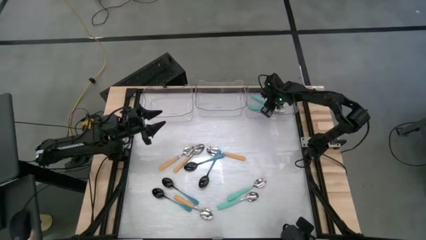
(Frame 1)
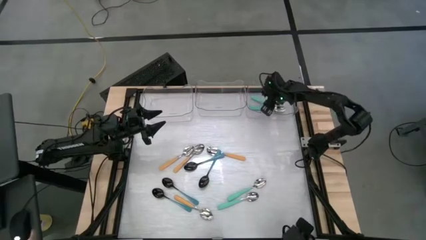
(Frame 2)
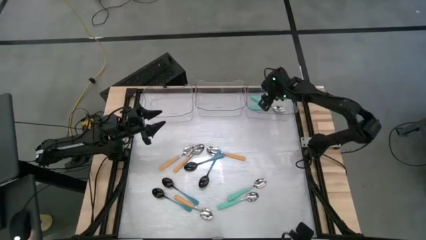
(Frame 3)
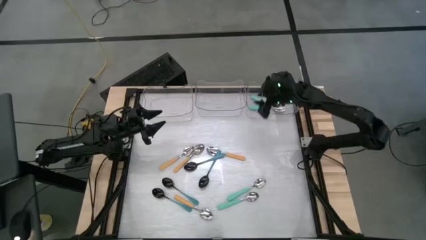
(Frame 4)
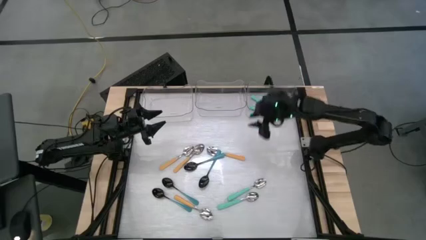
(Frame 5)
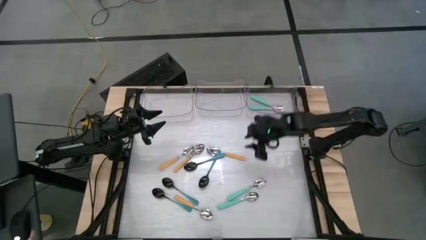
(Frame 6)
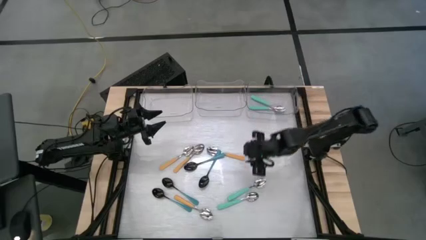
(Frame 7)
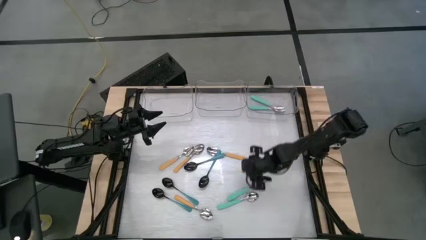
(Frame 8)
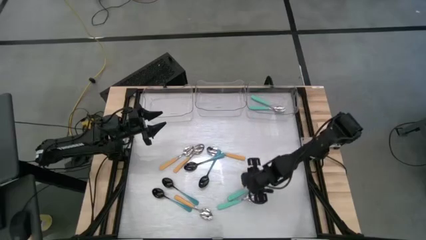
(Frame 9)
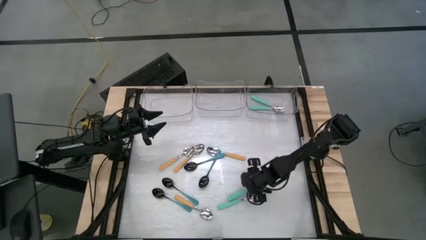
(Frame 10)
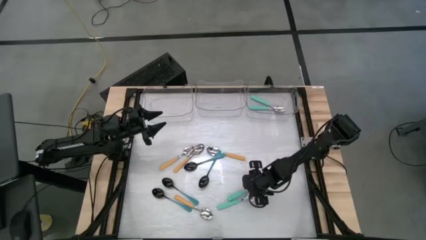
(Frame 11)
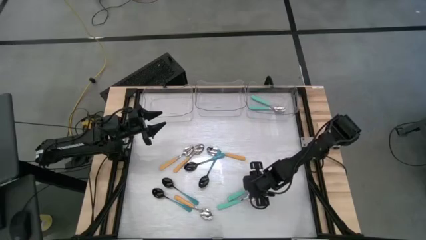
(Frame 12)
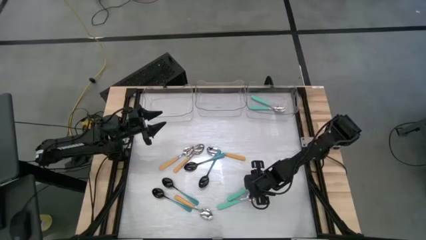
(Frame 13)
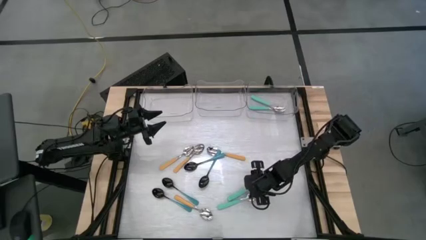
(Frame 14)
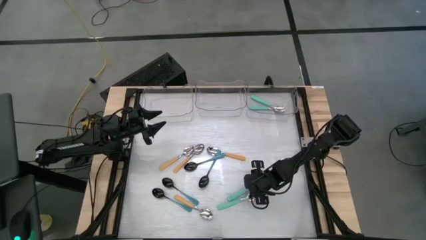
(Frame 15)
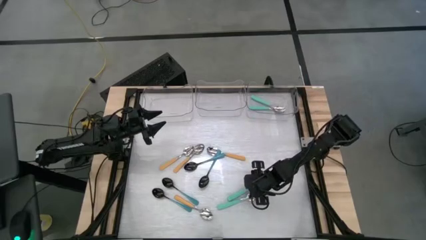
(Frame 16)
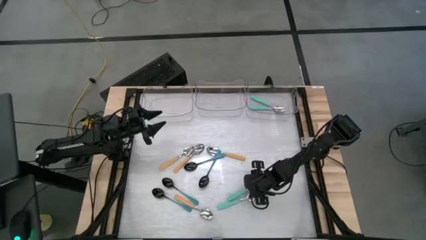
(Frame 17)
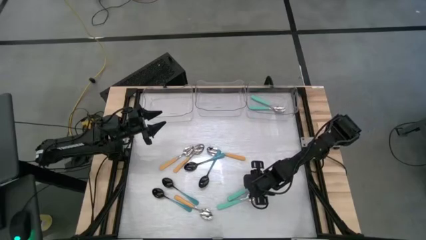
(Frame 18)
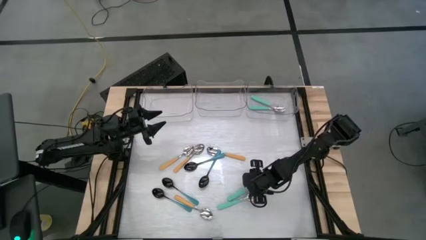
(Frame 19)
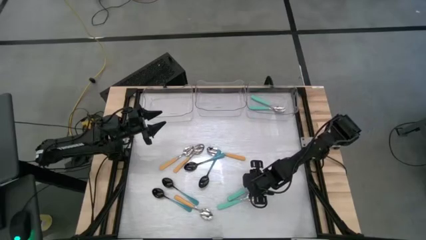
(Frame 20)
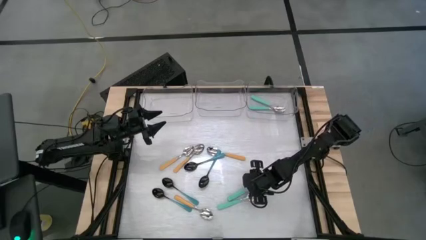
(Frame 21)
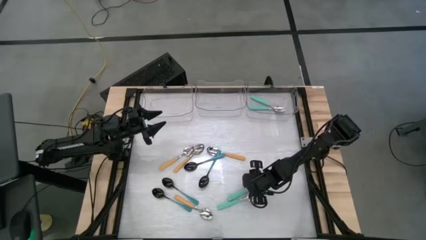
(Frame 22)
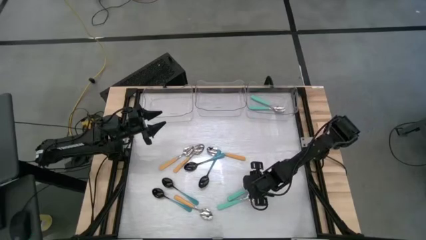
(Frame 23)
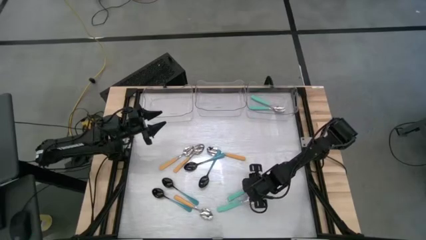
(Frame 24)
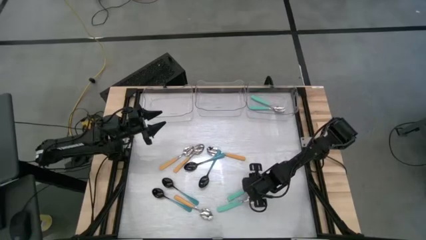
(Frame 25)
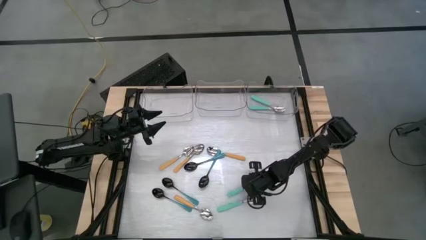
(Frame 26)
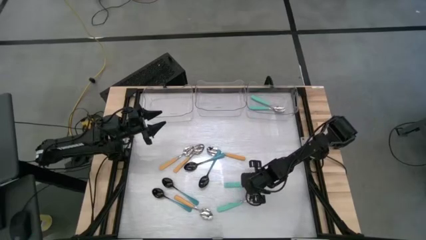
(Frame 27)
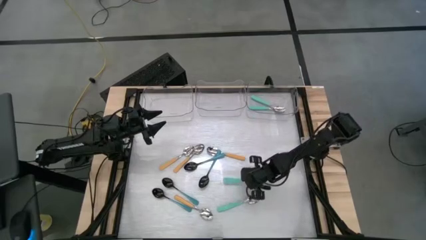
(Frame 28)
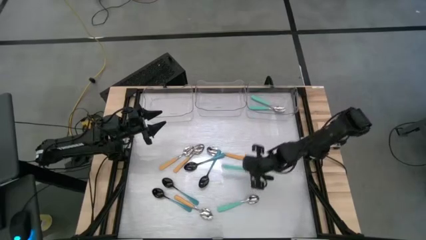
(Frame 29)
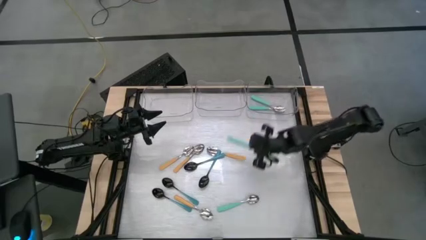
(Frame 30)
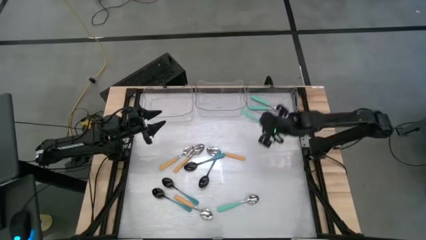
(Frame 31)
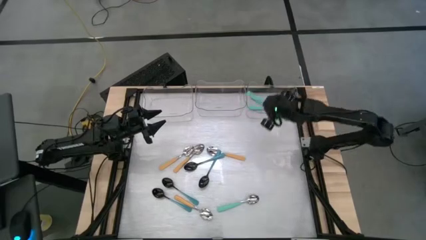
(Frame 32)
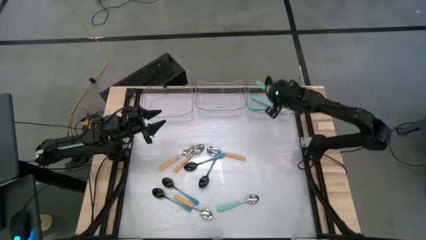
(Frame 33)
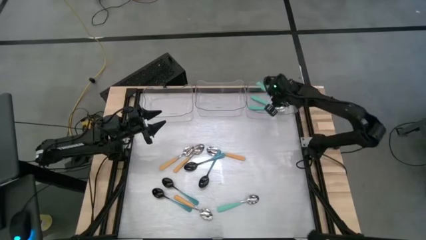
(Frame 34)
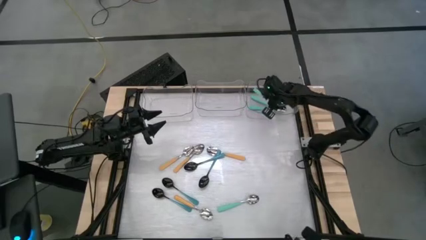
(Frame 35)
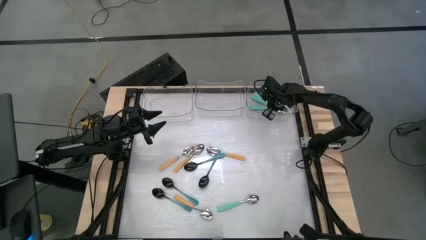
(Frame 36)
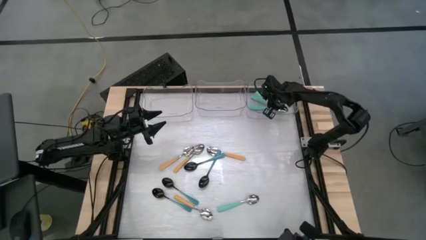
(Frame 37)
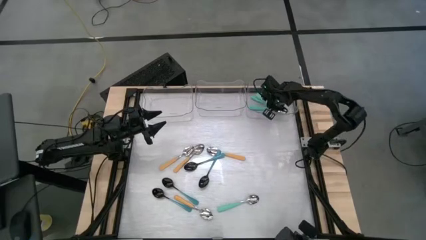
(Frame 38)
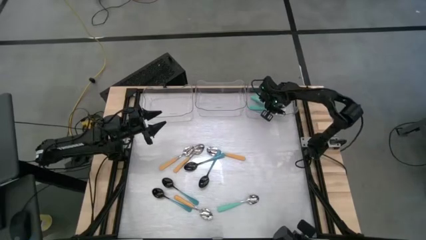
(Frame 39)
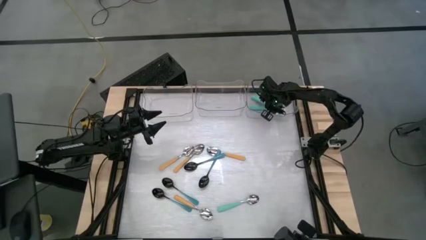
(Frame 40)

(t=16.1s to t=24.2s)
Task: Sort silverware by color (type)
Put the top light blue spoon into the top right transparent bin

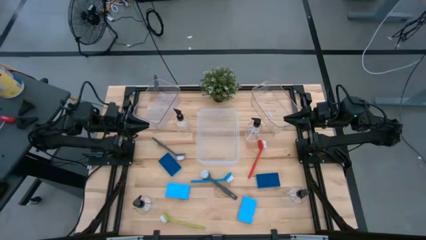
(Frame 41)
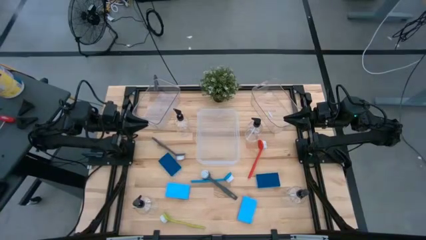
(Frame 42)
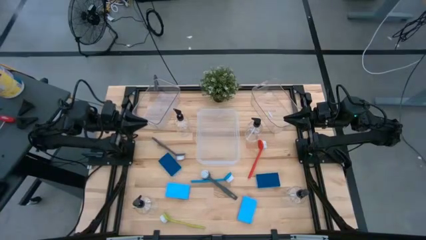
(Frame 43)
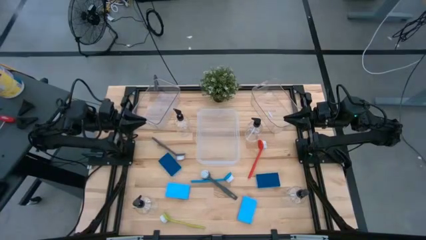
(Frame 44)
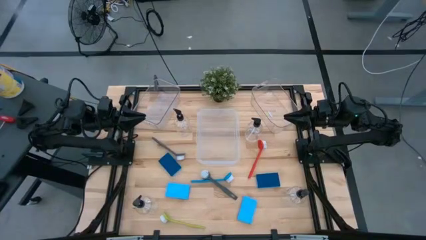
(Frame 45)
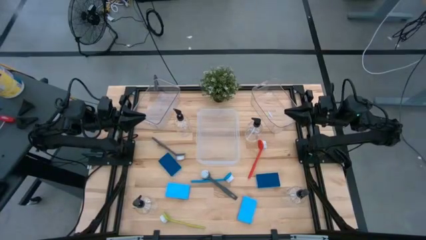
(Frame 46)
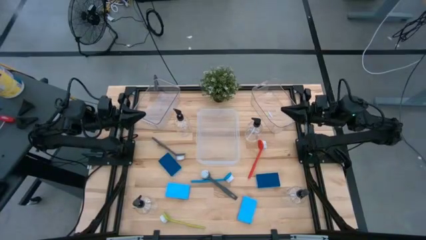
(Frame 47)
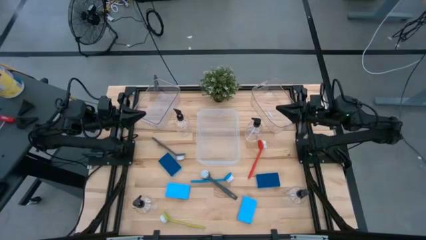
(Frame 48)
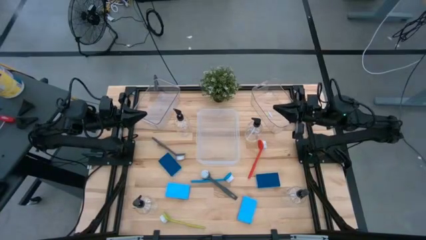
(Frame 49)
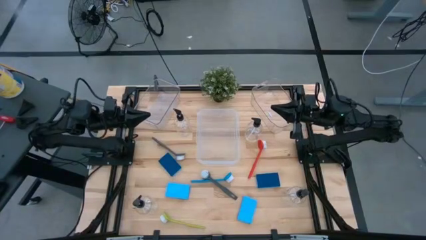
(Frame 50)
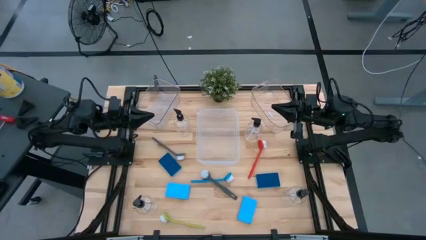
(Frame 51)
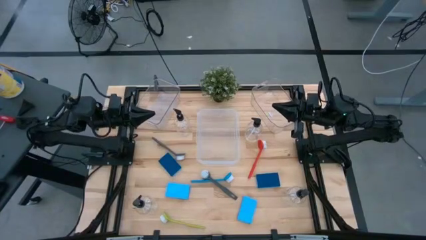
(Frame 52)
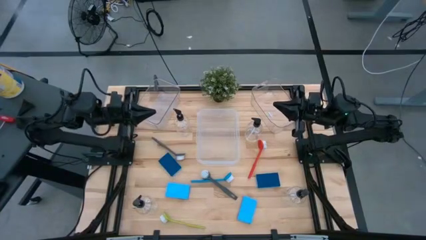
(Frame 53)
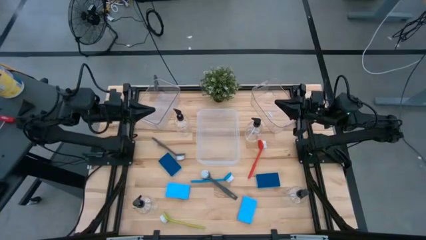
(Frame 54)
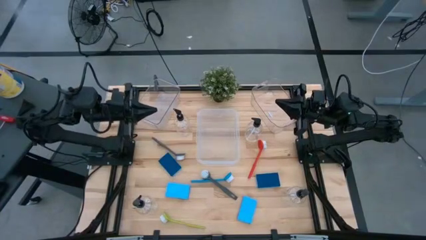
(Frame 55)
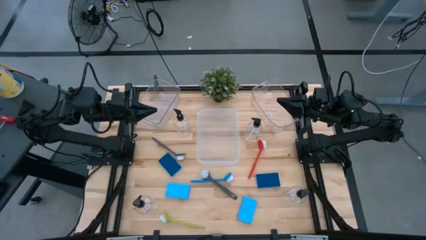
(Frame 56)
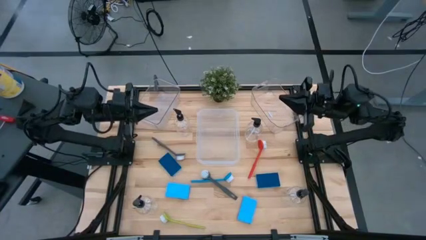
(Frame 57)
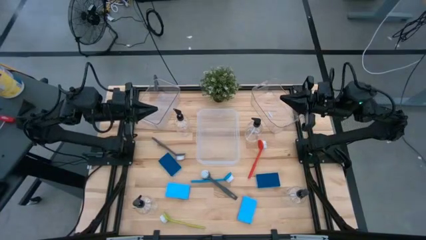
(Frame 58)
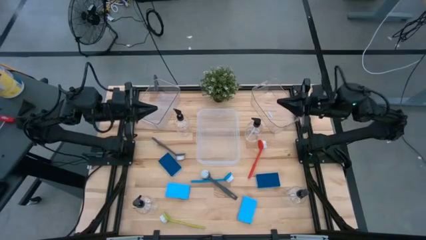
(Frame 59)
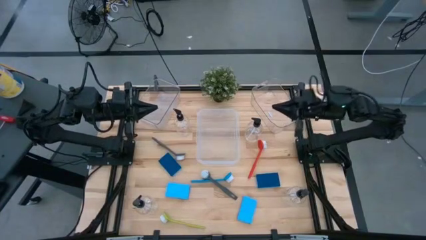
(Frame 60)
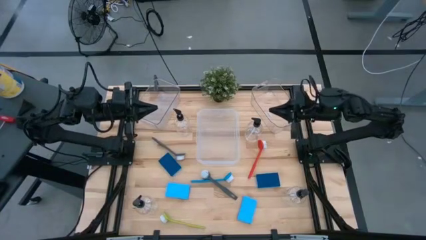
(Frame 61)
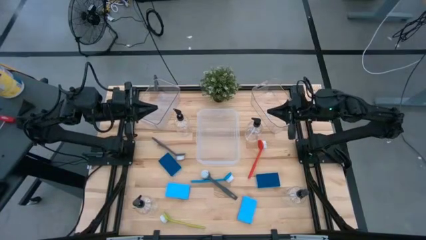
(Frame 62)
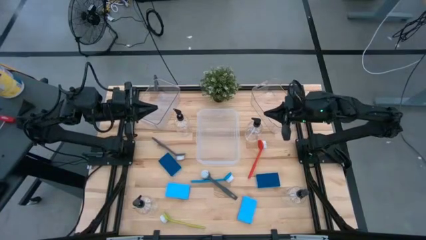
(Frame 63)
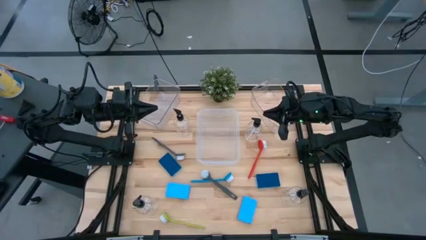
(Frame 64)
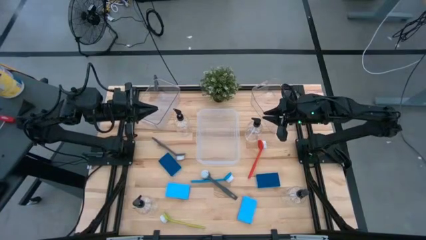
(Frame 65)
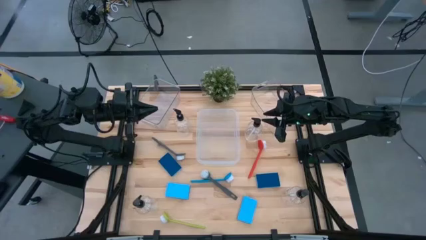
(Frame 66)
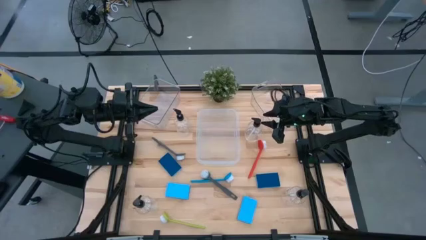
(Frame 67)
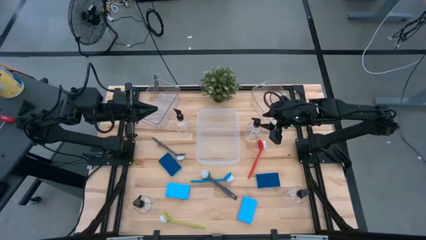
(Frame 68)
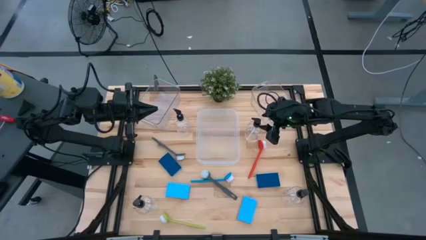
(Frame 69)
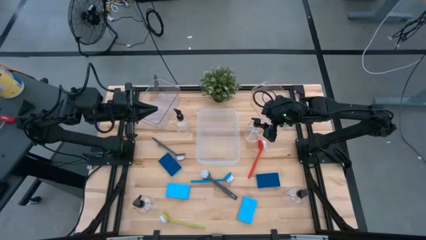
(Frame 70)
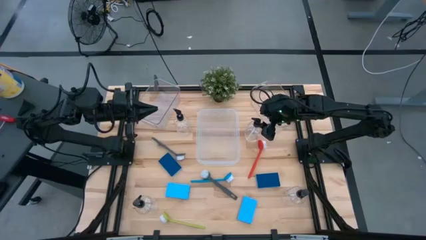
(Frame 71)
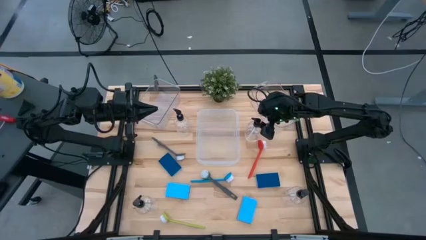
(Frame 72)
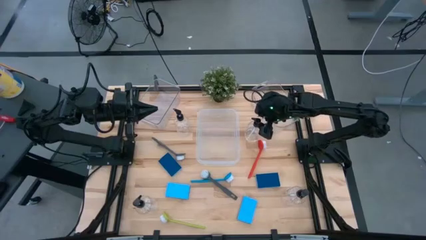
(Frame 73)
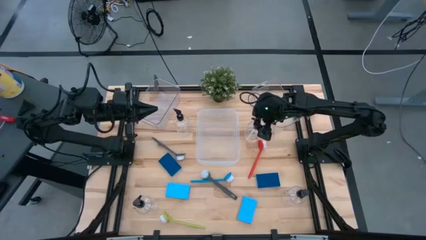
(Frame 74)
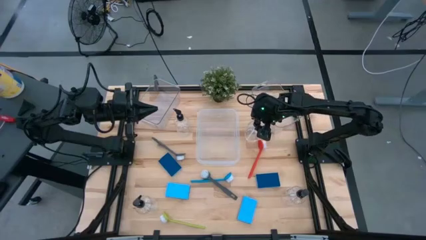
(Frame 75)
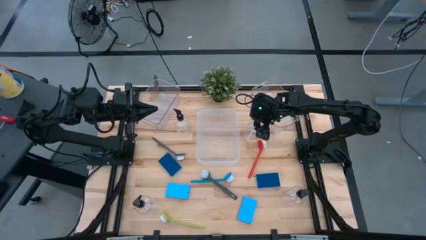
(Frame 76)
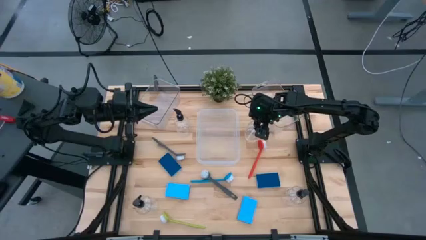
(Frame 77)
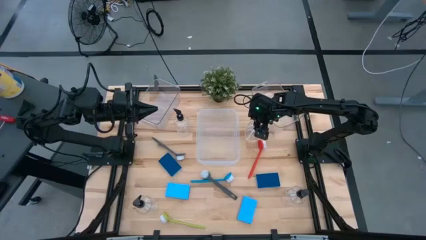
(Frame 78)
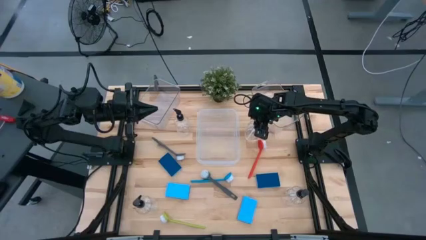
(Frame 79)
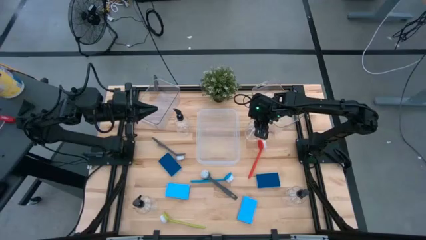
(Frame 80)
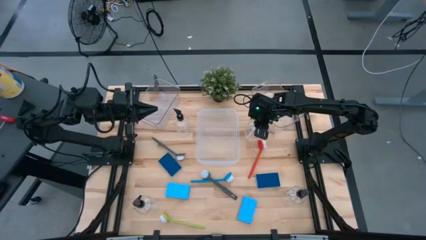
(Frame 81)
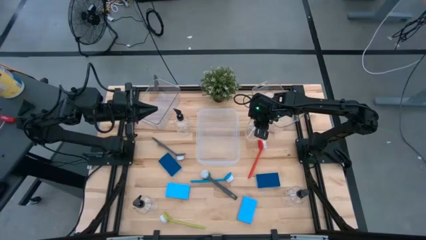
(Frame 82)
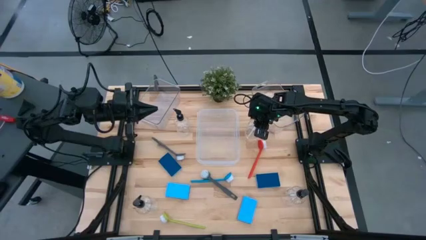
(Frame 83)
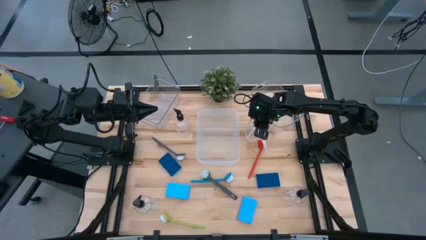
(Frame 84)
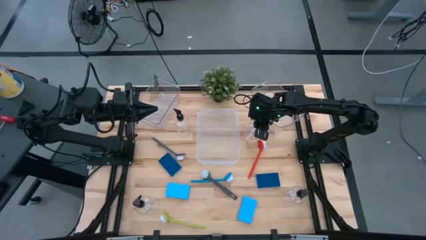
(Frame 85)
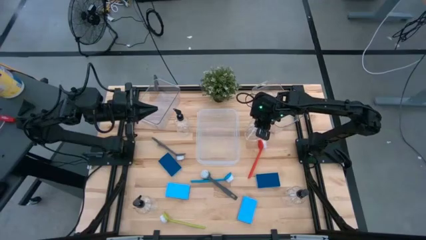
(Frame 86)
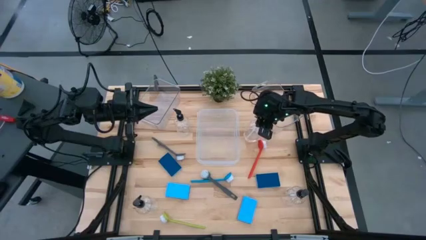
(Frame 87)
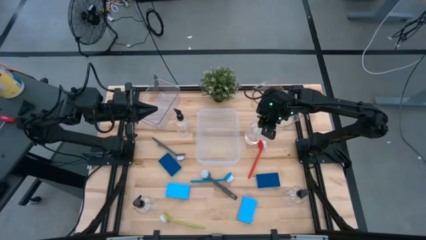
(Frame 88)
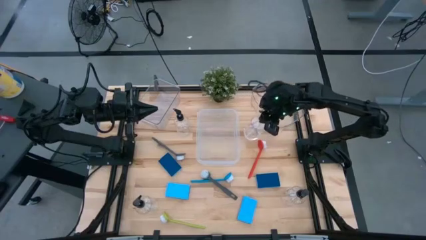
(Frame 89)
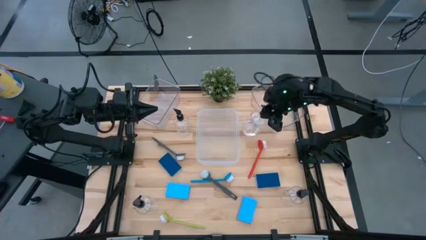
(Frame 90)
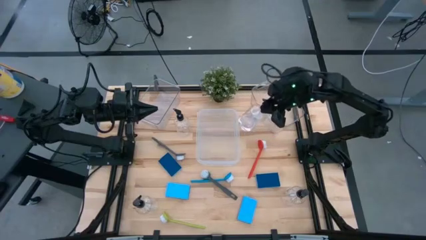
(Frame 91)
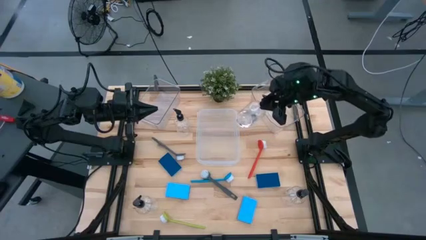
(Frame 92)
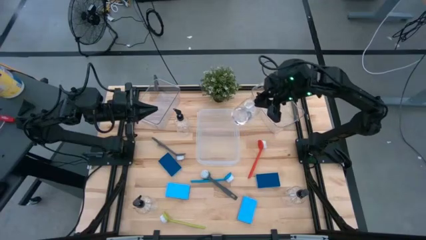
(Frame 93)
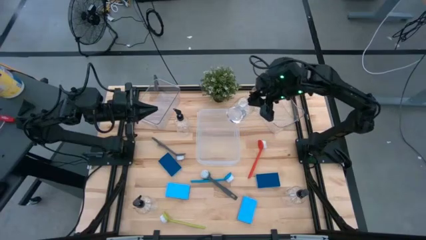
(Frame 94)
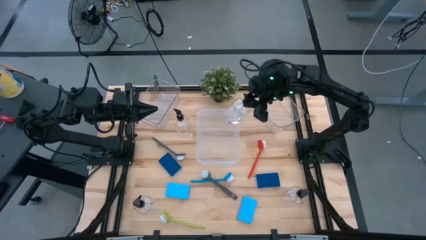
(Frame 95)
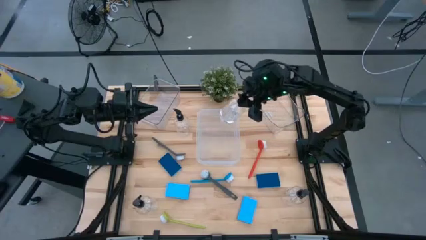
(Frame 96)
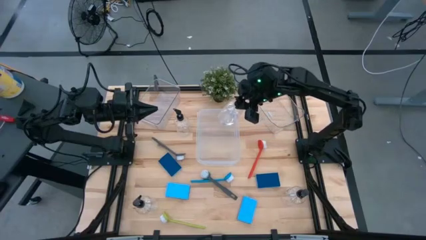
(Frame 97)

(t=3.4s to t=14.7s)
Task: Pick & Place Kitchen Sink Supplies
Put the black soap dispenser into the right transparent bin
